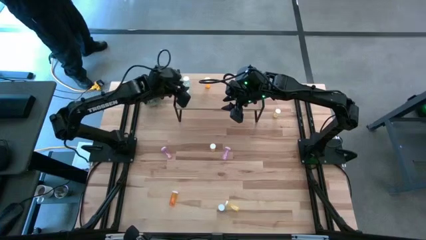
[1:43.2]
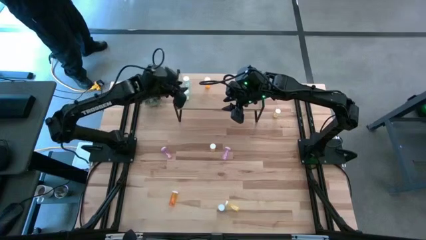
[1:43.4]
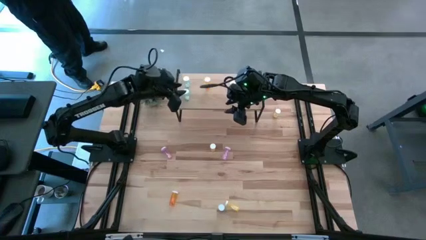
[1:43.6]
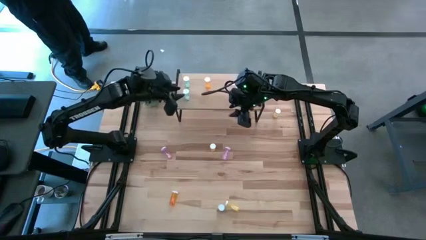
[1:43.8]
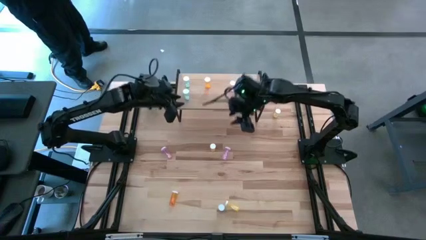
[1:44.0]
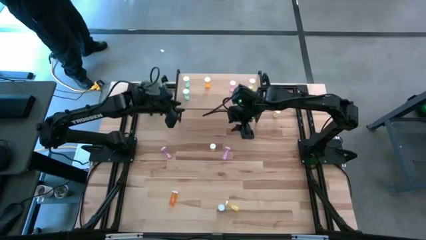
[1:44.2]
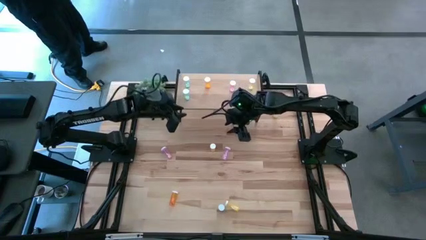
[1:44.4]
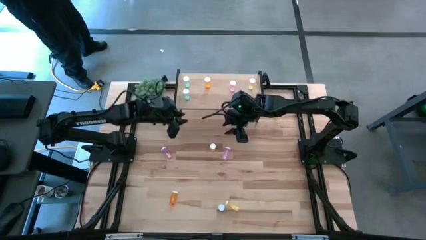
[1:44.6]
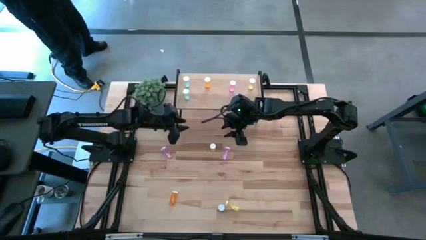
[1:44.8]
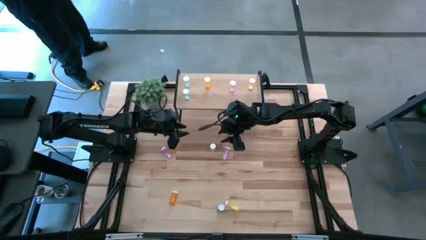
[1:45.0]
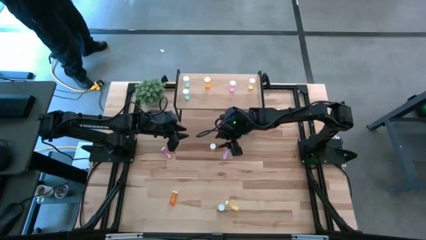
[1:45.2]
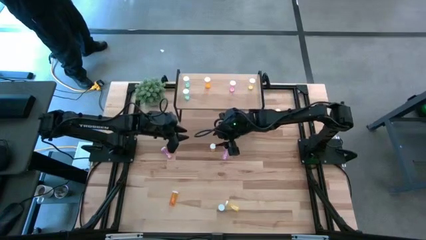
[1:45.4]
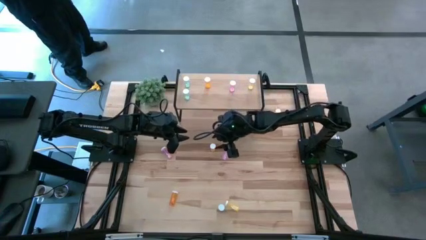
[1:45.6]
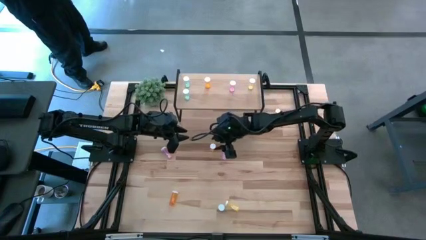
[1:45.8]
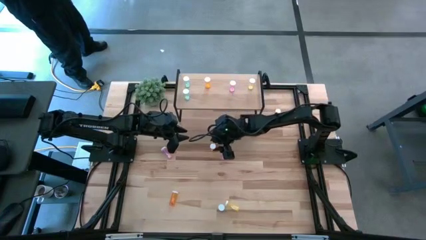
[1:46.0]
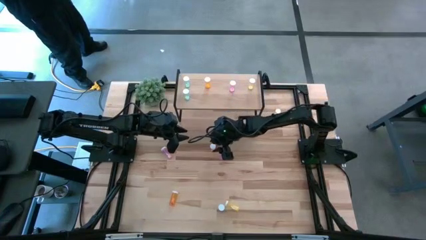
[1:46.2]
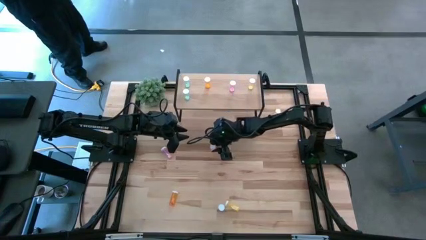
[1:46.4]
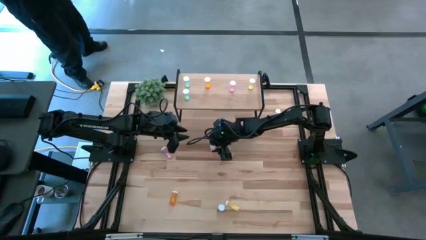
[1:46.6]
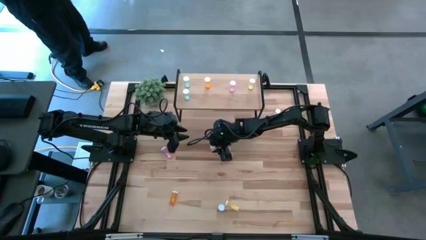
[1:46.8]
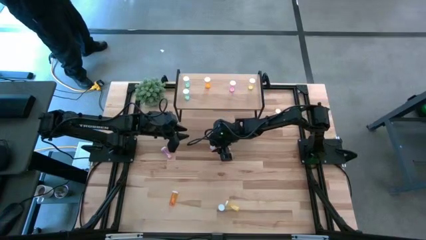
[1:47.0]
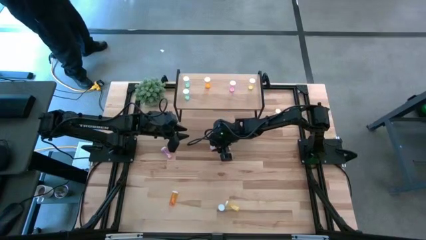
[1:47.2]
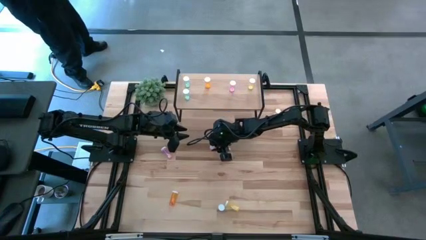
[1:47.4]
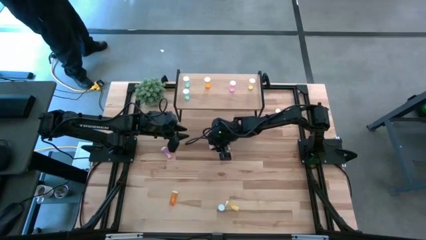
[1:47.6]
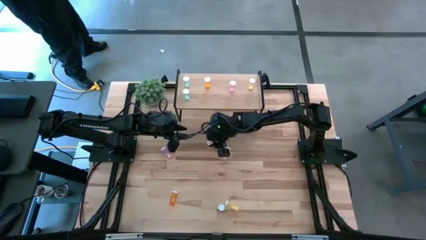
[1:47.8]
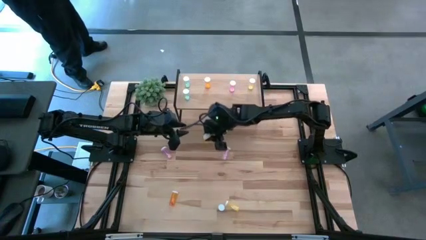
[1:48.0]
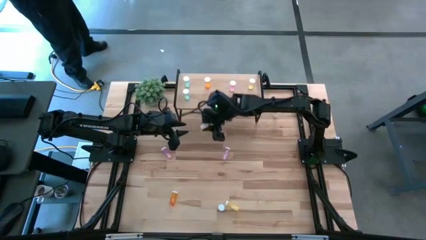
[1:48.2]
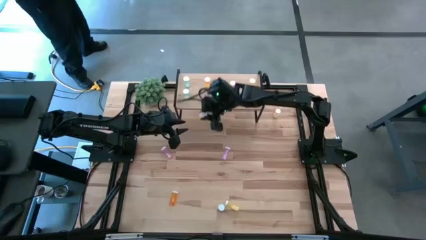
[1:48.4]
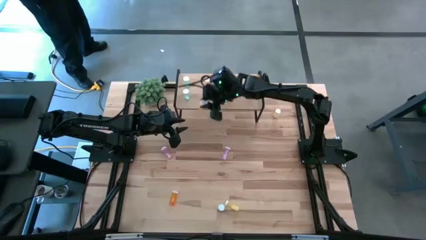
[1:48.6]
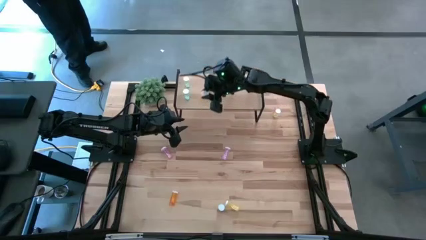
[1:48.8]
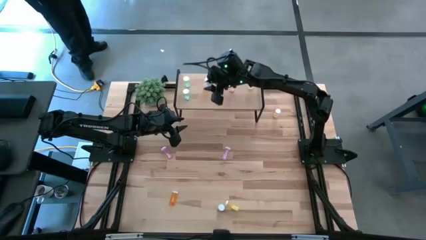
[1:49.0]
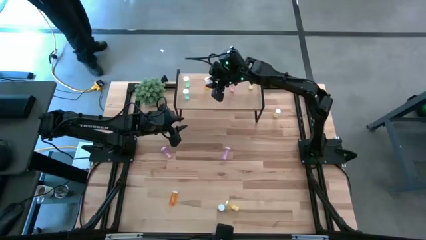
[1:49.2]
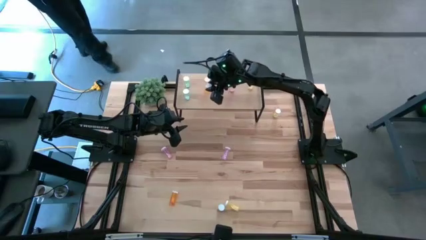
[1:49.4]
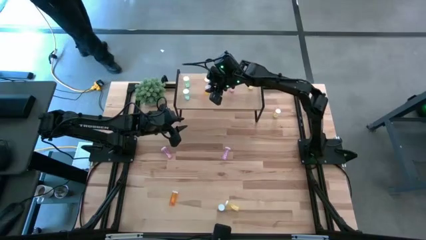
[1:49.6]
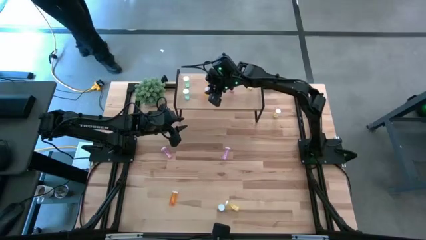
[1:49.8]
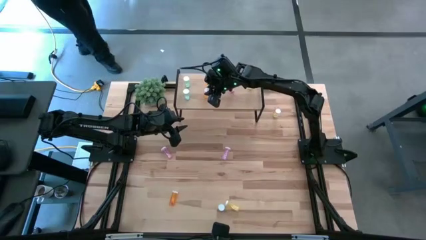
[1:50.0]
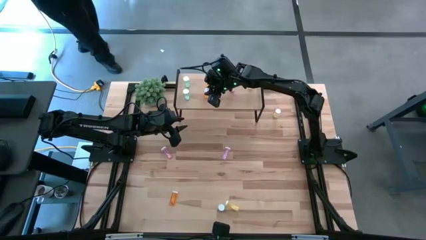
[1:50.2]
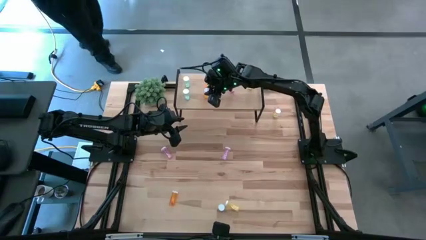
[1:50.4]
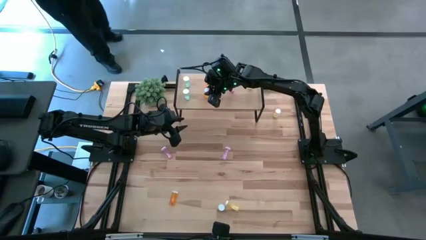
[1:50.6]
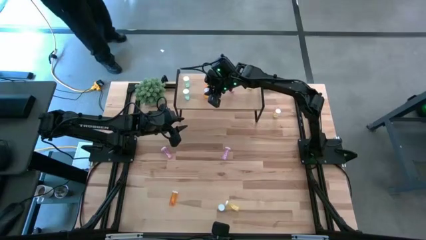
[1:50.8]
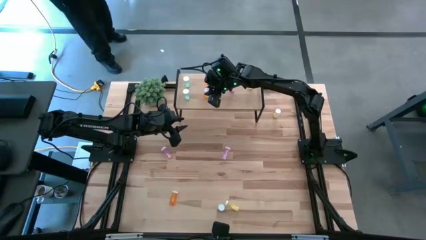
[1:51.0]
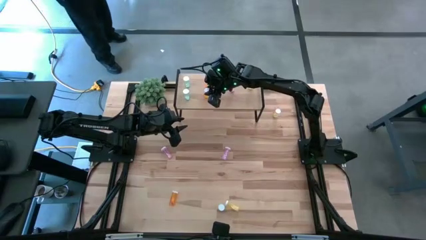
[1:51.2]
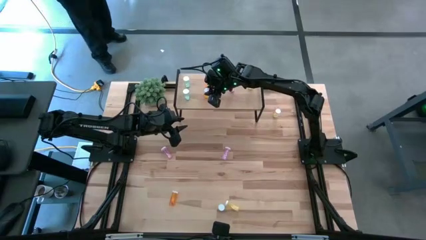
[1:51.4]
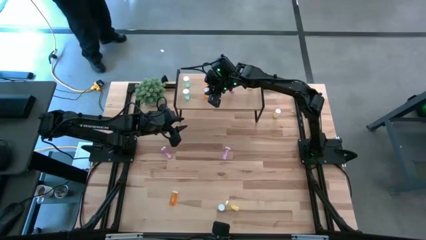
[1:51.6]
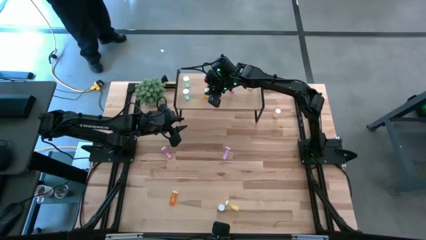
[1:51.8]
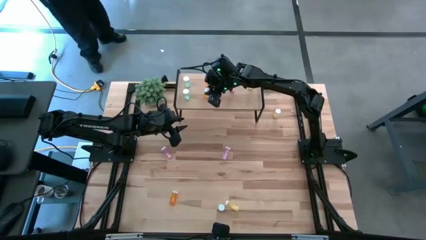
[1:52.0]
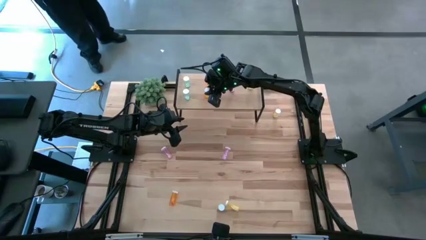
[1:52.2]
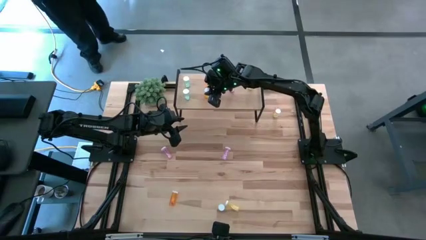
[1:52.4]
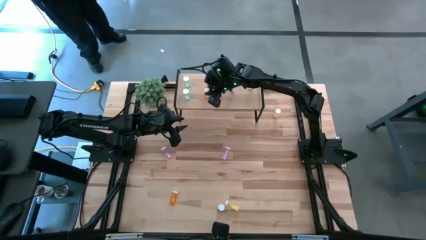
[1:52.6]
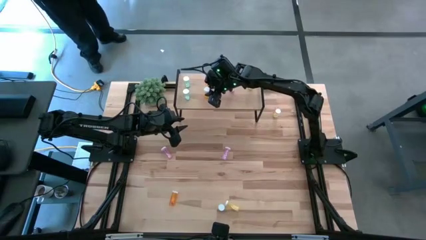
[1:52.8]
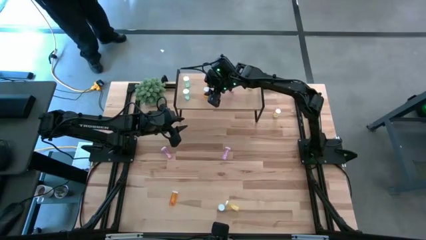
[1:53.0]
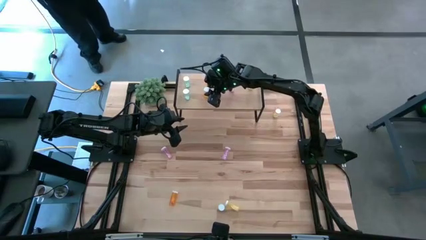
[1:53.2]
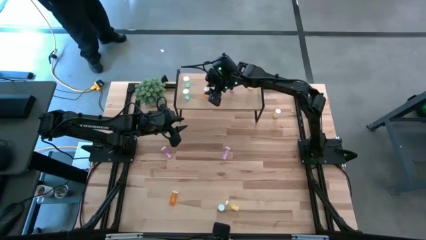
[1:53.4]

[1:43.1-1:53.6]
Task: Pick and place medicine bottles onto shelf by color
Put the top orange pill bottle on the shelf aligned with the orange pill bottle

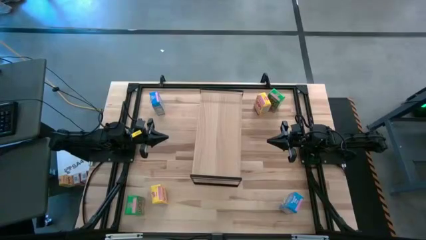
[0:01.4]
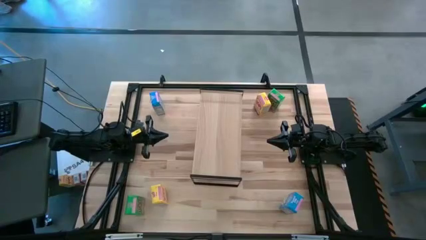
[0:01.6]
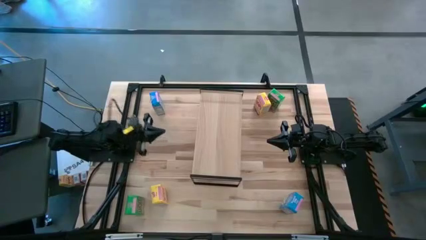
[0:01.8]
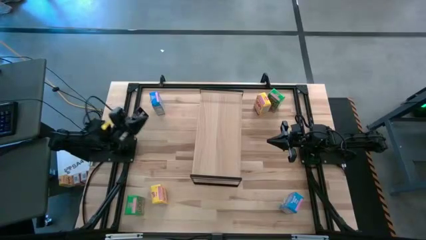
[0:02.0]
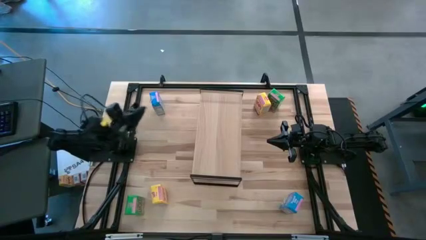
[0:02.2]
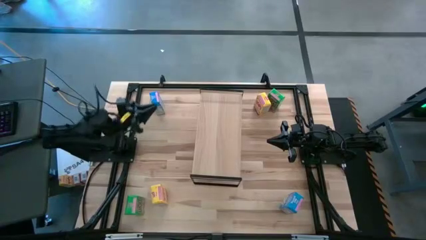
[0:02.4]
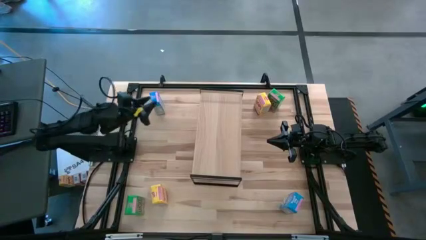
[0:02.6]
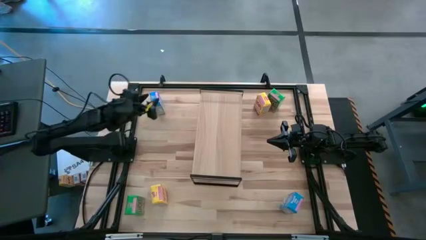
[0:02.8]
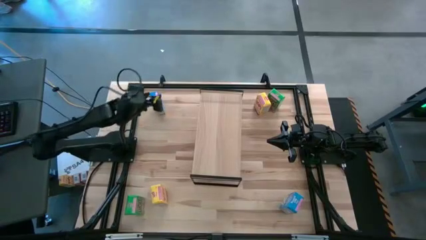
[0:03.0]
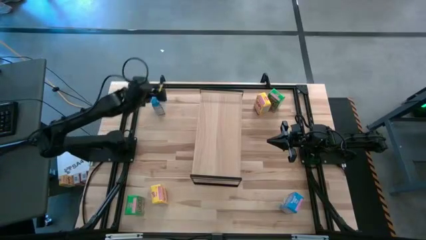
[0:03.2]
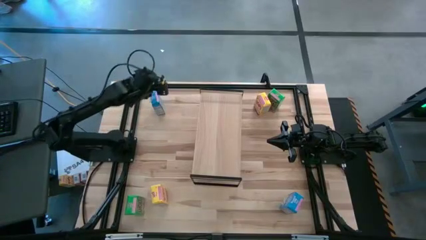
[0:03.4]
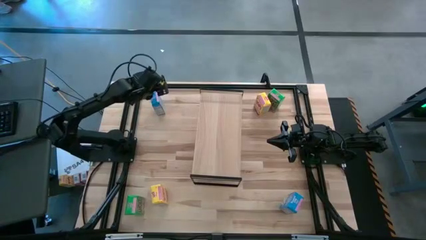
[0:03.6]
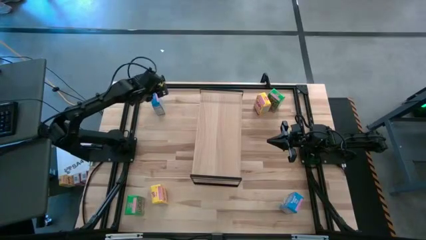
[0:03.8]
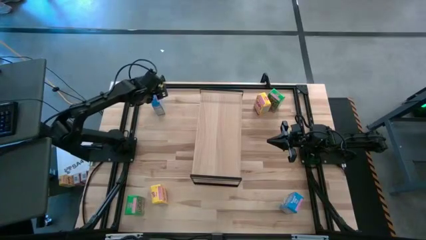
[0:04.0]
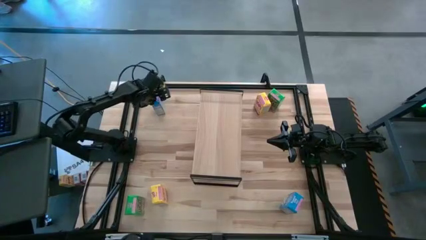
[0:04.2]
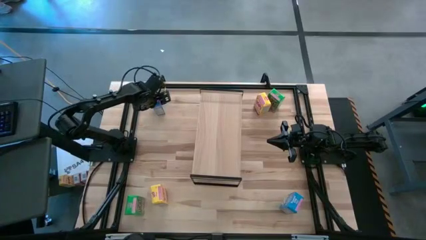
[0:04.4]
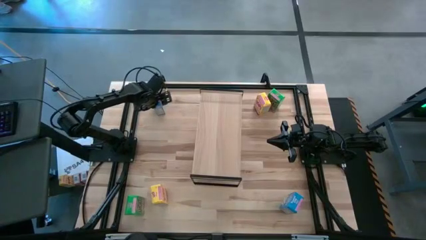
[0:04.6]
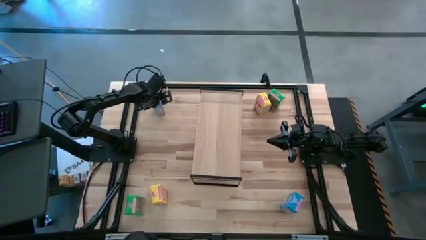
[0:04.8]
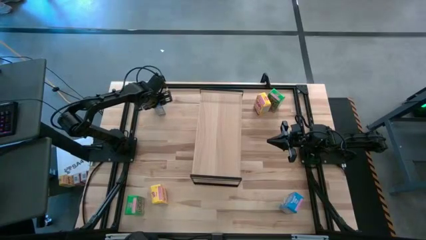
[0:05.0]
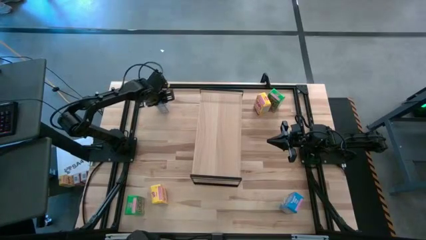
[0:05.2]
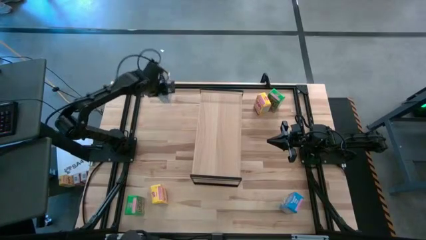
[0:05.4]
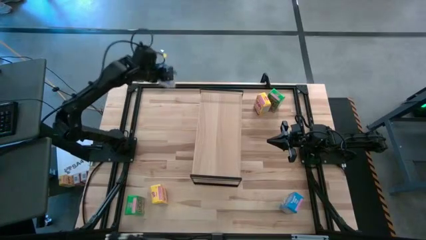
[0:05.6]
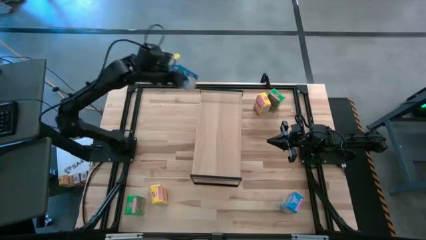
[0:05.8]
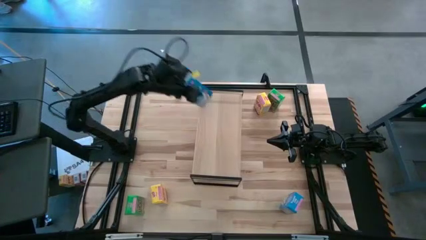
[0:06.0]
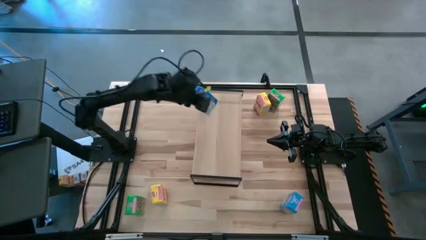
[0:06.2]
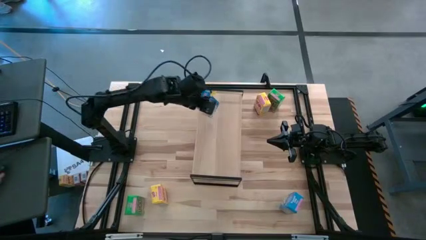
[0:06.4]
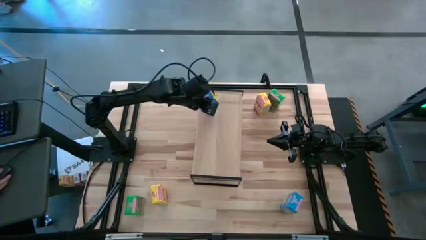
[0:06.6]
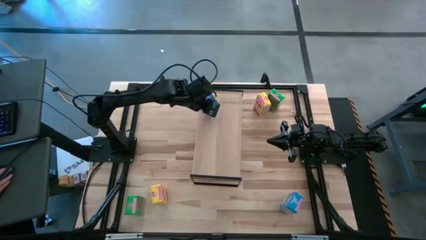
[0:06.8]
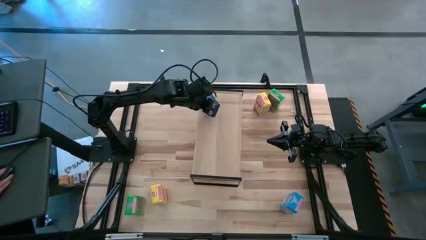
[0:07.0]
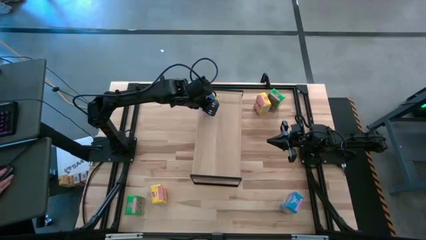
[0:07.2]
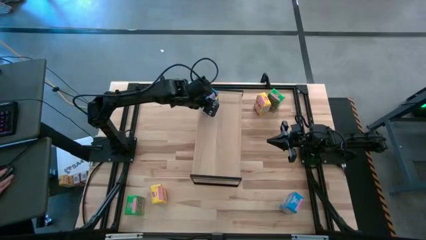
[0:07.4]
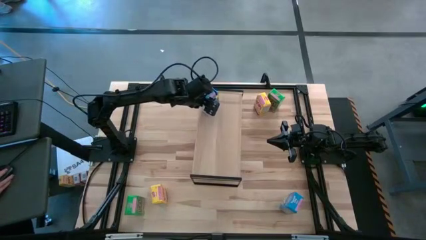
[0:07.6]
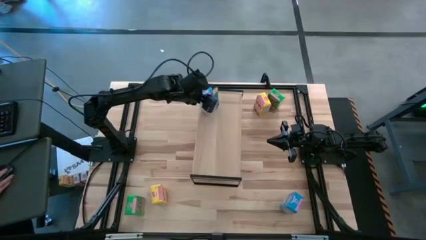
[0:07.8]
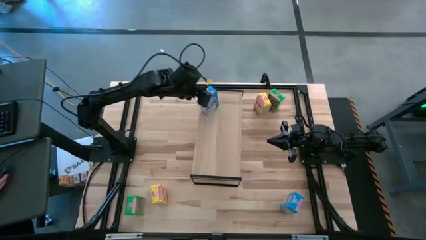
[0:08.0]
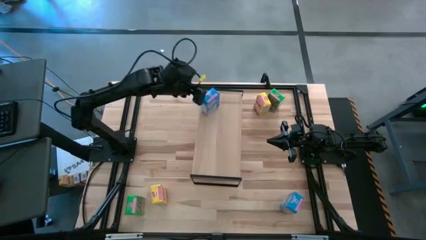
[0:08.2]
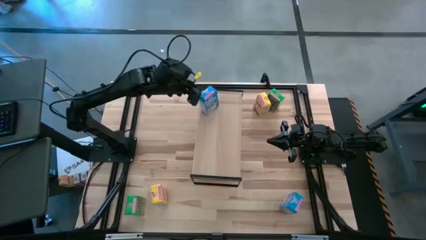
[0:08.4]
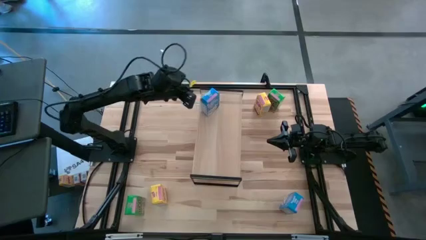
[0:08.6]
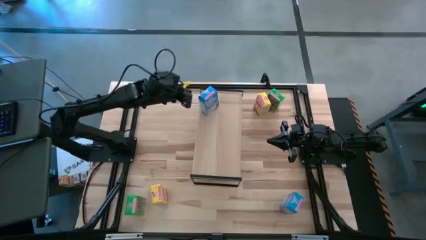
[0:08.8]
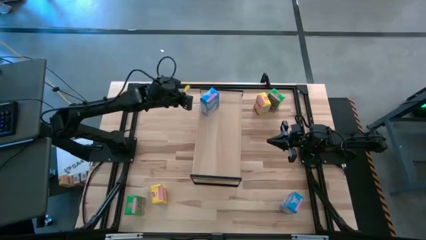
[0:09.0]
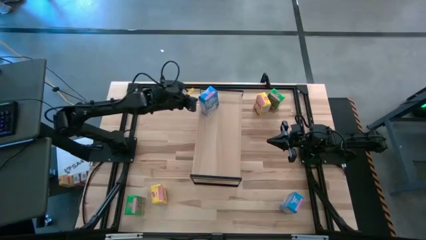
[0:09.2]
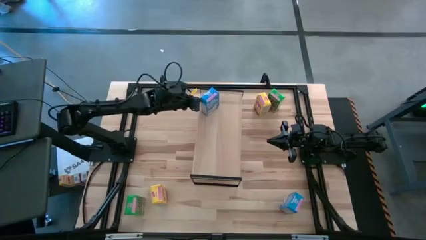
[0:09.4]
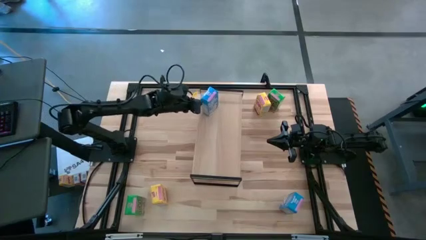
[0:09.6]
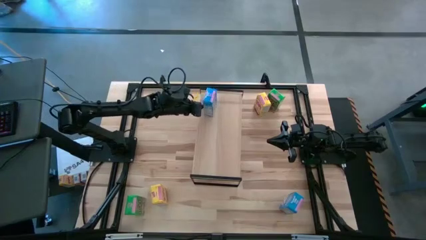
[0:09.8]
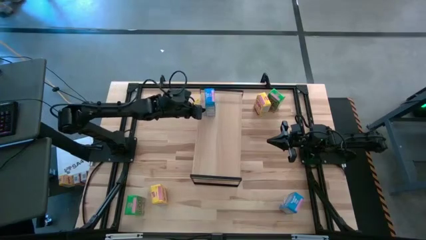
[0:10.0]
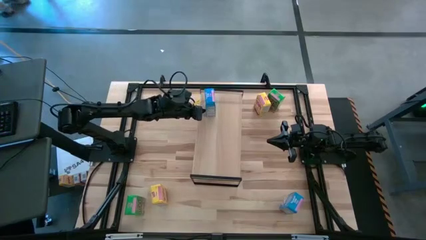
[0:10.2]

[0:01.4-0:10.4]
Task: Stack cereal on shelf
Put the top blue cereal box on the shelf
